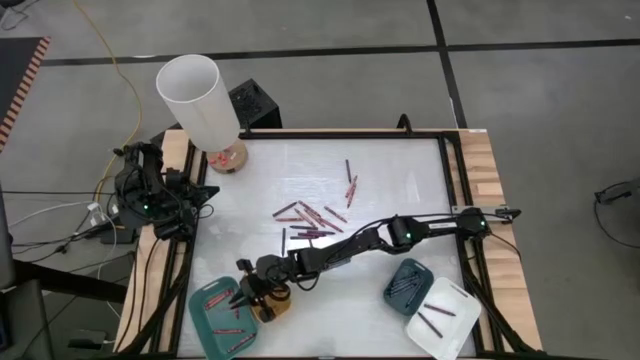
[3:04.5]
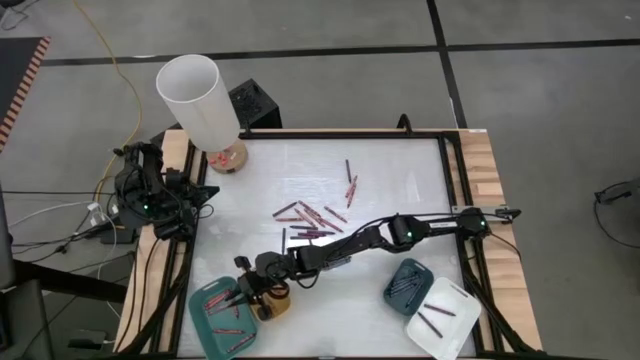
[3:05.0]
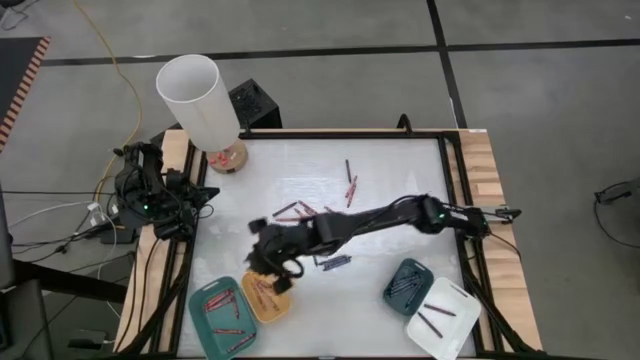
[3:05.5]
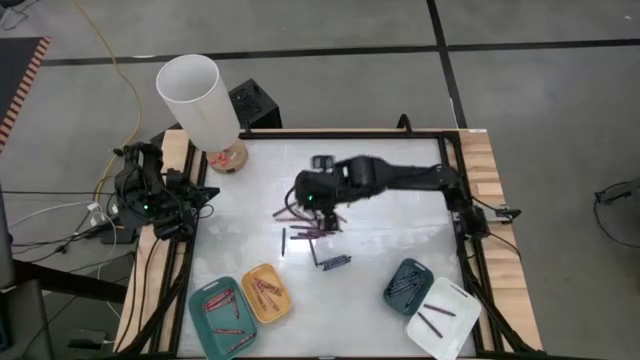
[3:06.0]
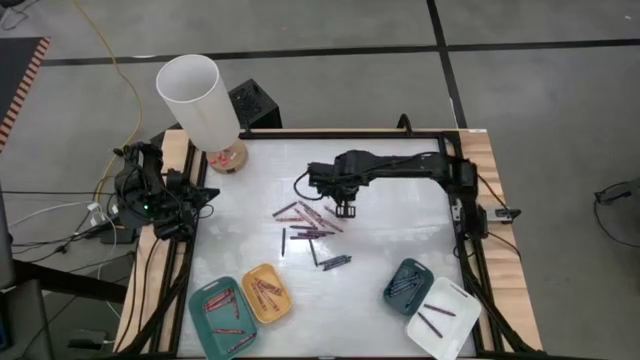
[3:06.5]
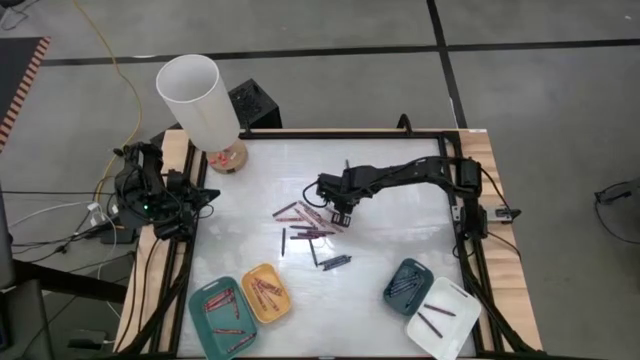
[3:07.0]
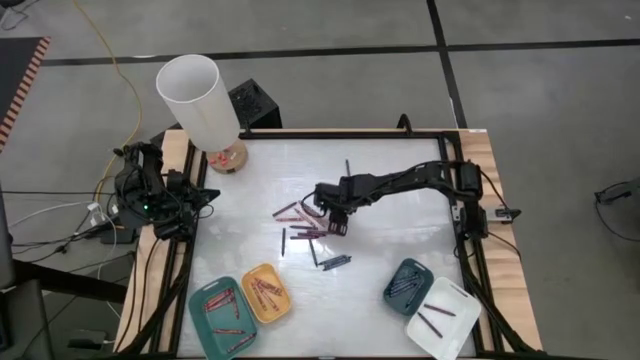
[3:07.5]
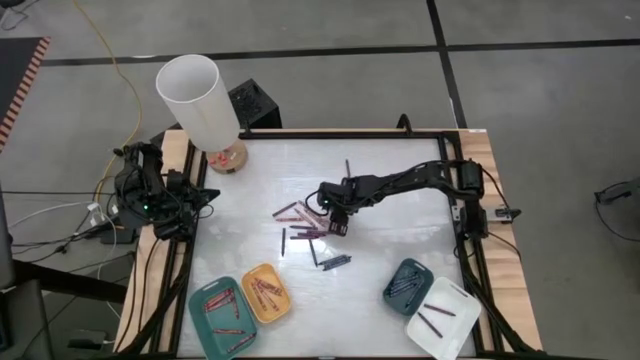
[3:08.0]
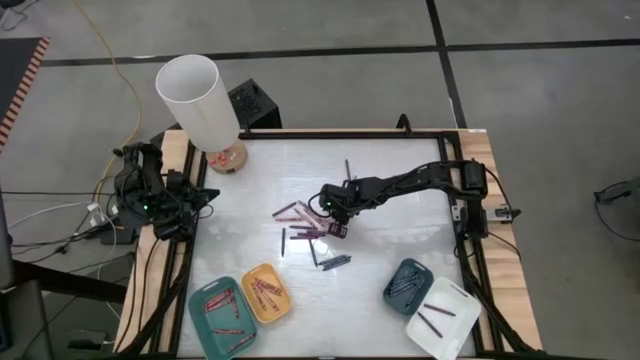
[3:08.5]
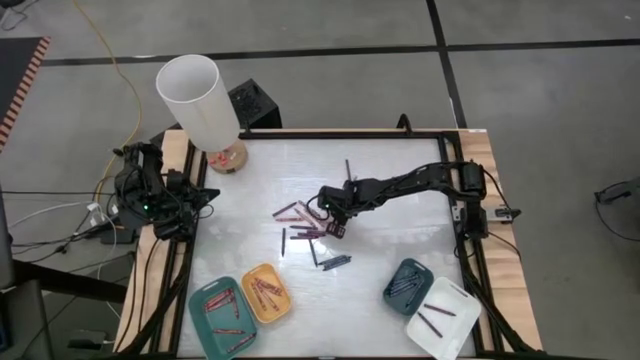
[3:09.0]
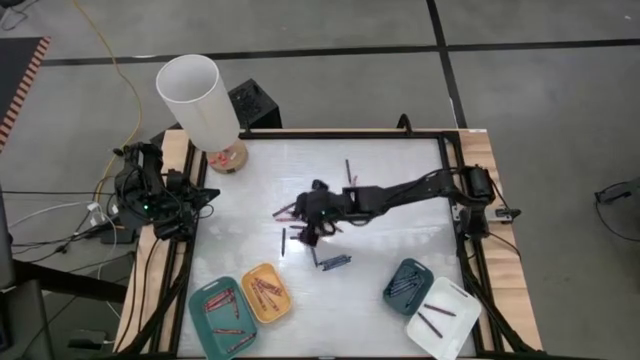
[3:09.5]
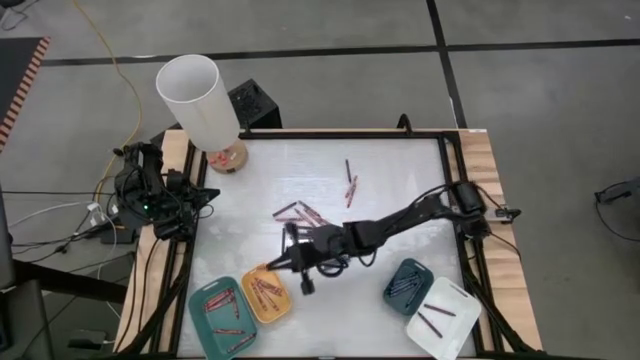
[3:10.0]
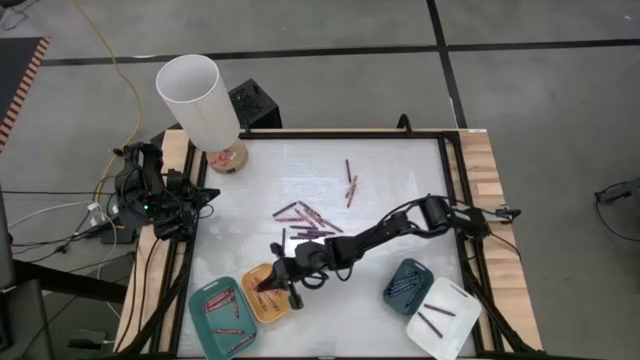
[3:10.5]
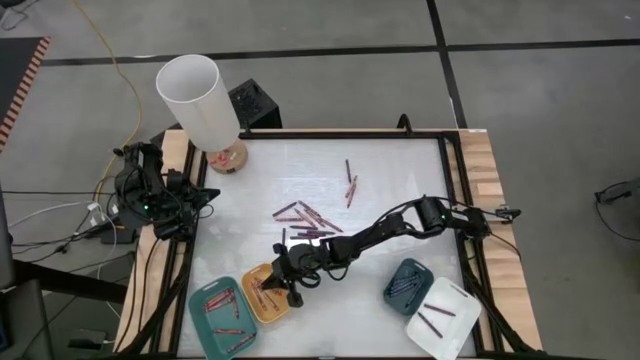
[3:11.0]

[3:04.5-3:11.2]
Task: Sort crayons
Put the pink crayon into the yellow bin

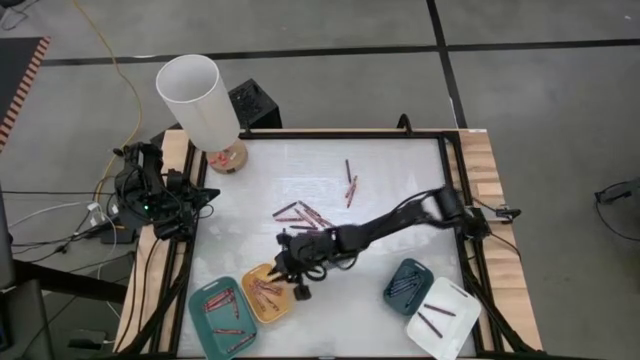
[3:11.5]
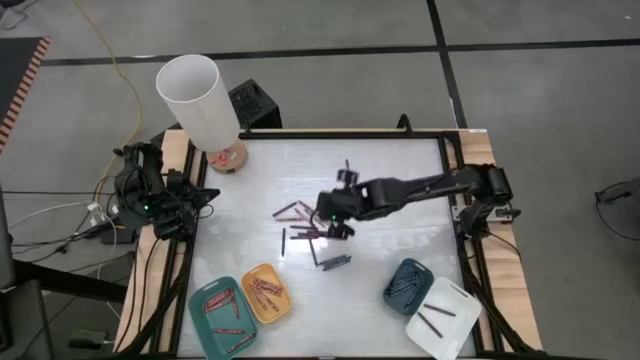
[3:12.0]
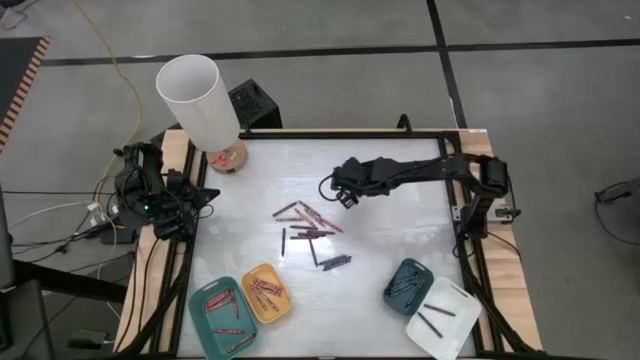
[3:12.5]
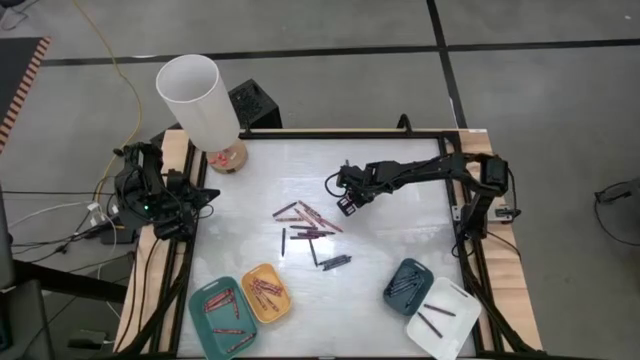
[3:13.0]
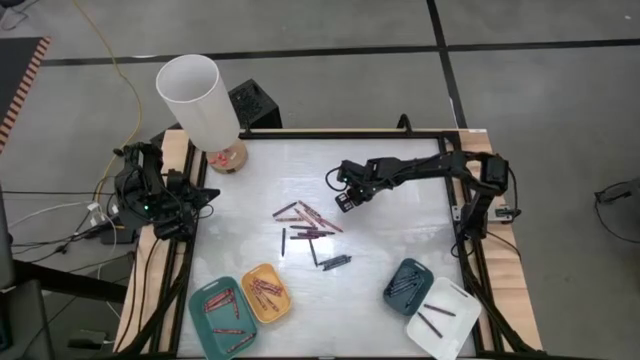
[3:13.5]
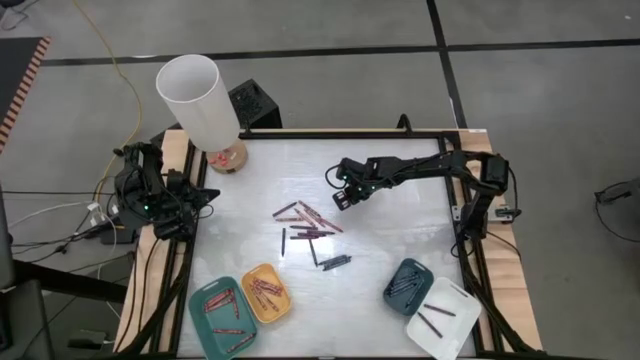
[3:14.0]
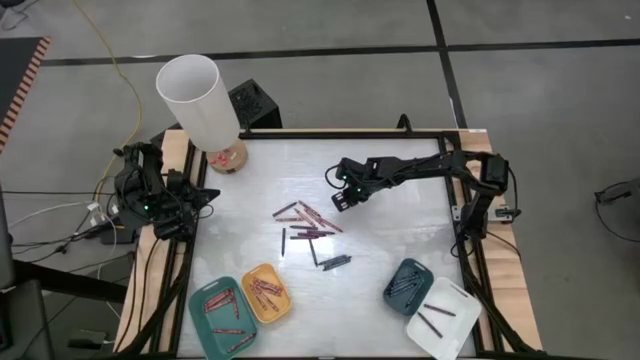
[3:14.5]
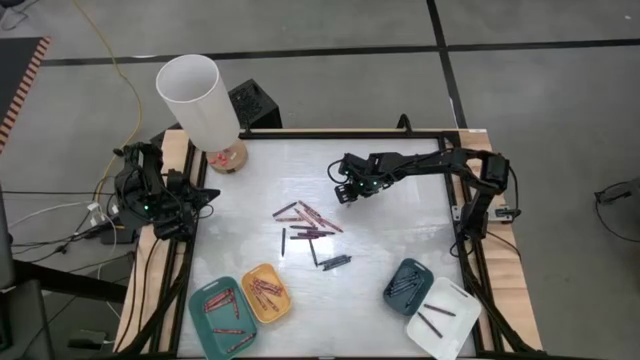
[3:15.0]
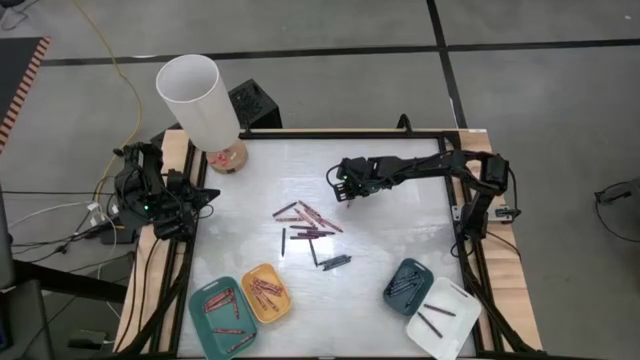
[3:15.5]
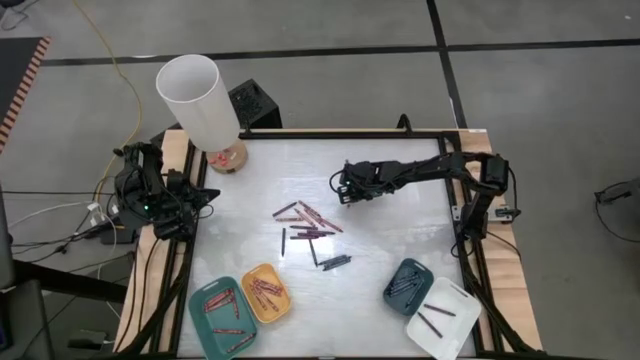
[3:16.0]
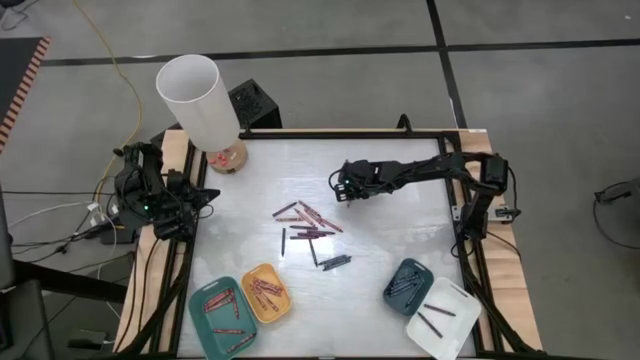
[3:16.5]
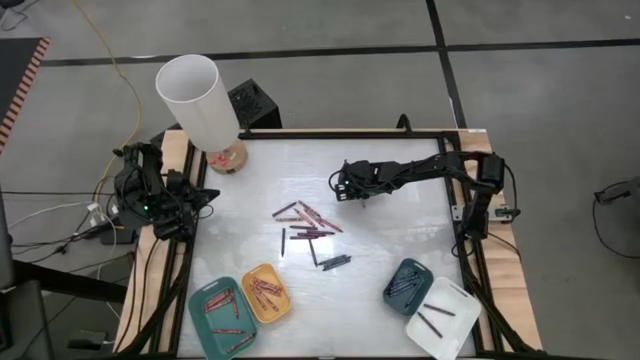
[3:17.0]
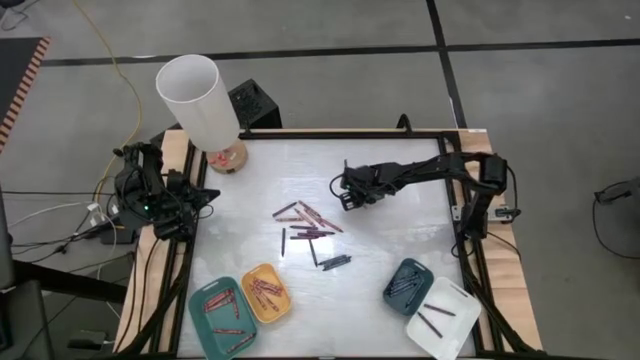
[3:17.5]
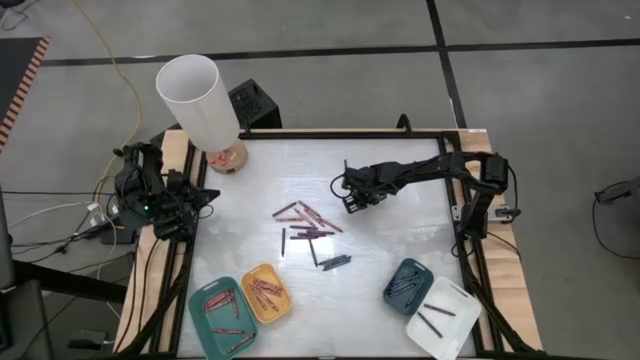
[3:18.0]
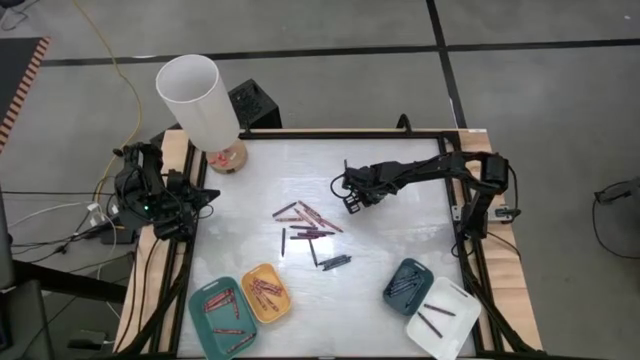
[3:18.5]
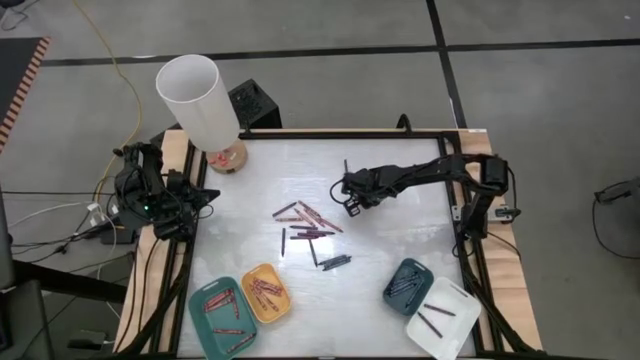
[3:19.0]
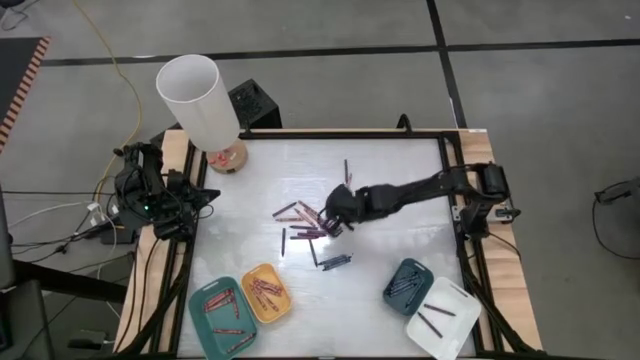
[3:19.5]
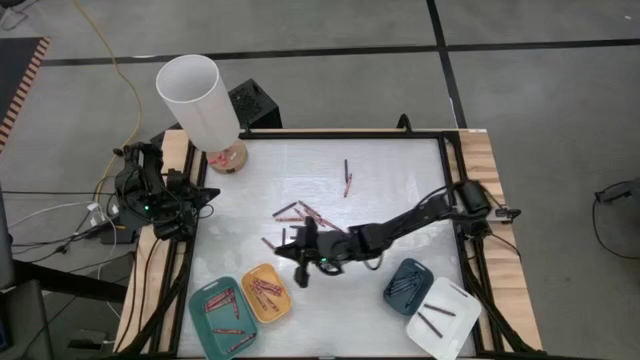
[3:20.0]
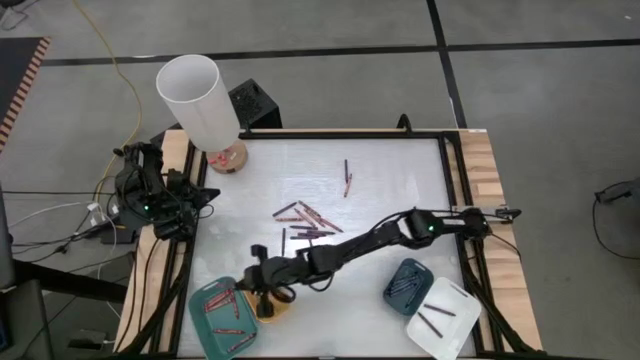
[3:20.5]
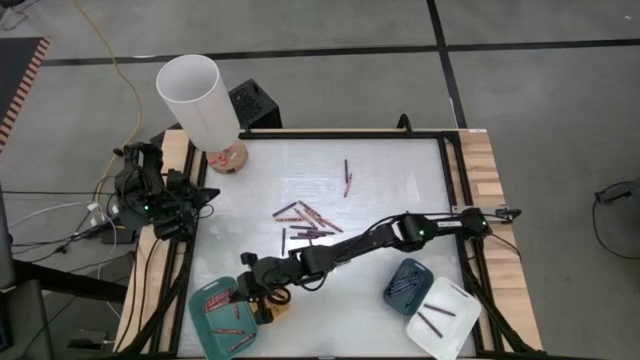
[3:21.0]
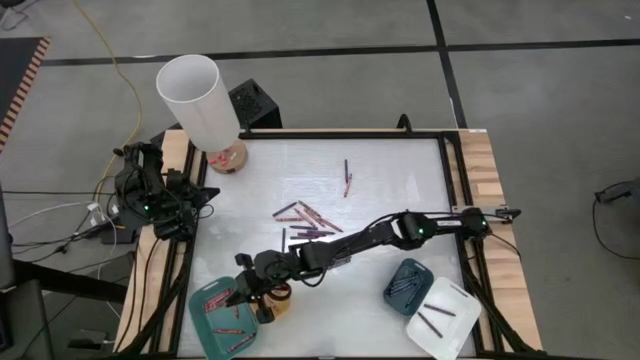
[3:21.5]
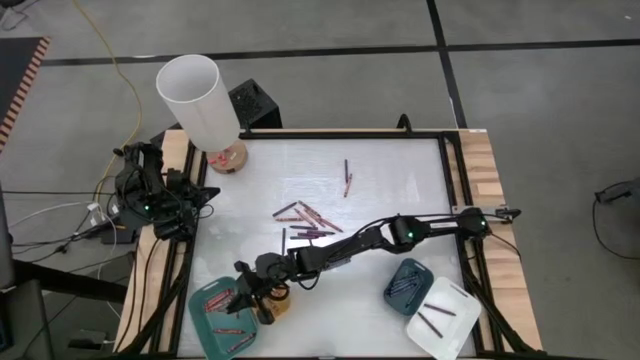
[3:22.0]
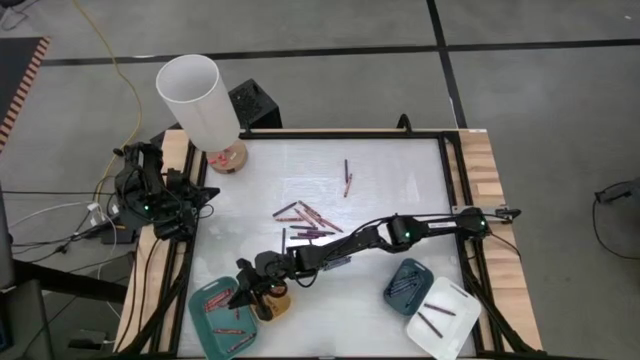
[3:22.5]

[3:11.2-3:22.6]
Put the red crayon into the blue bin

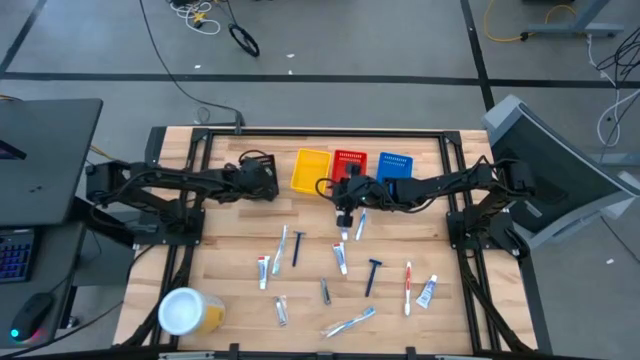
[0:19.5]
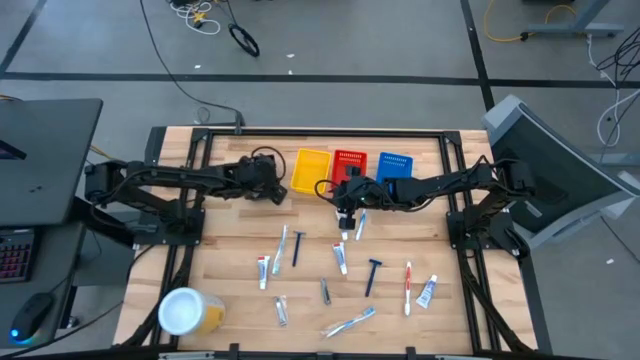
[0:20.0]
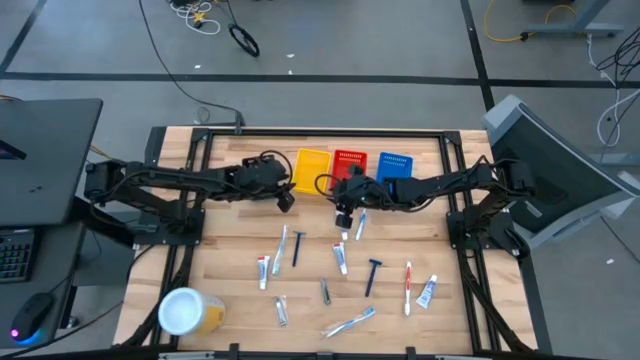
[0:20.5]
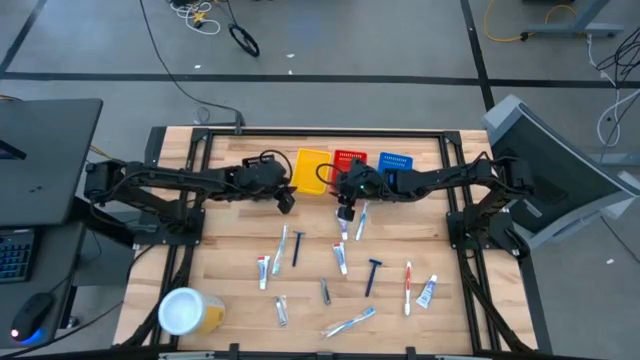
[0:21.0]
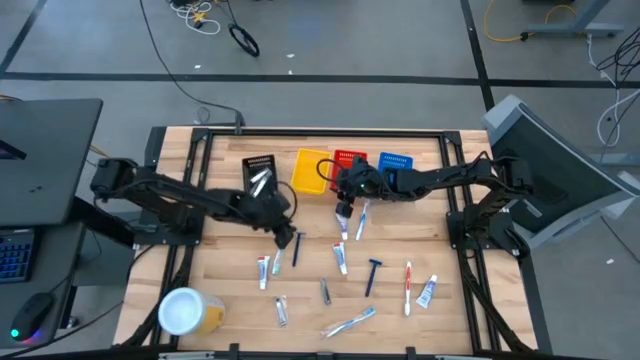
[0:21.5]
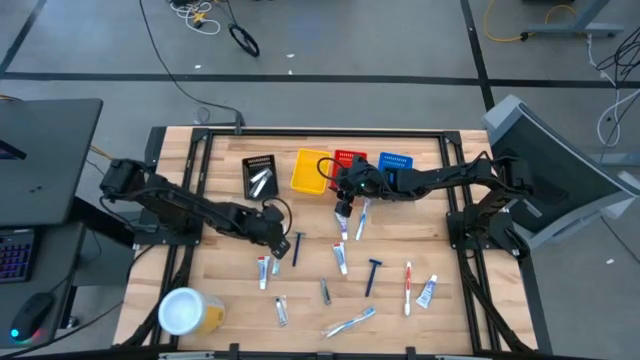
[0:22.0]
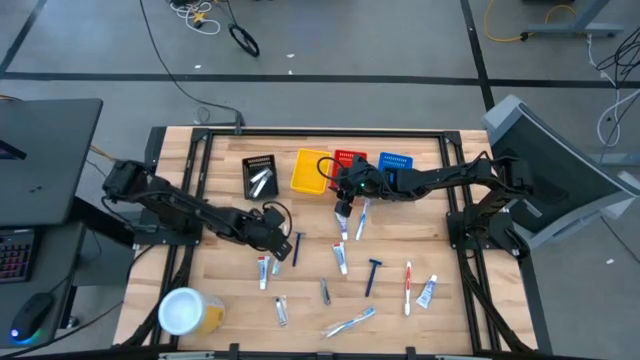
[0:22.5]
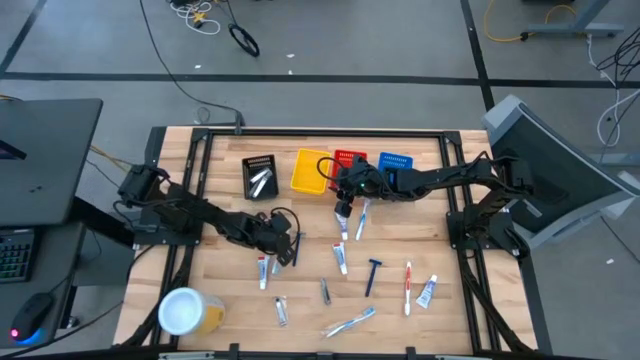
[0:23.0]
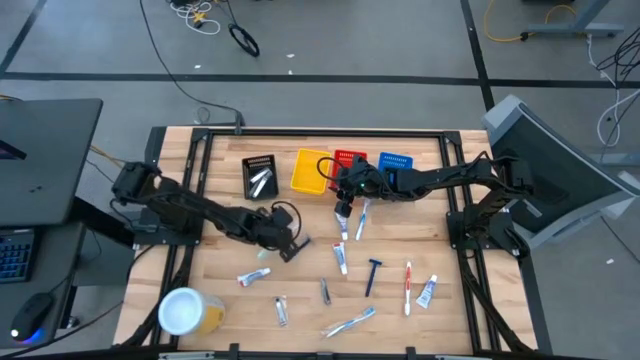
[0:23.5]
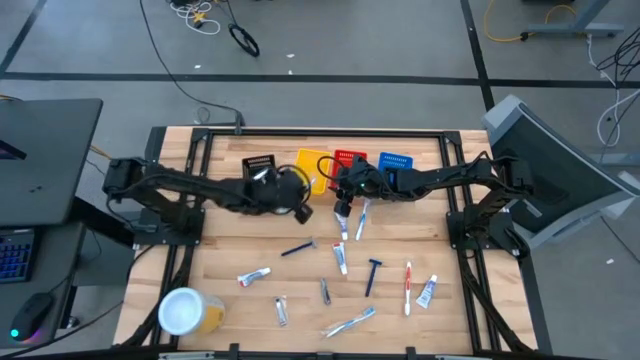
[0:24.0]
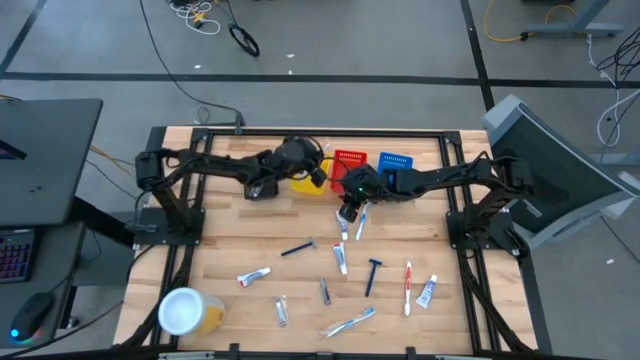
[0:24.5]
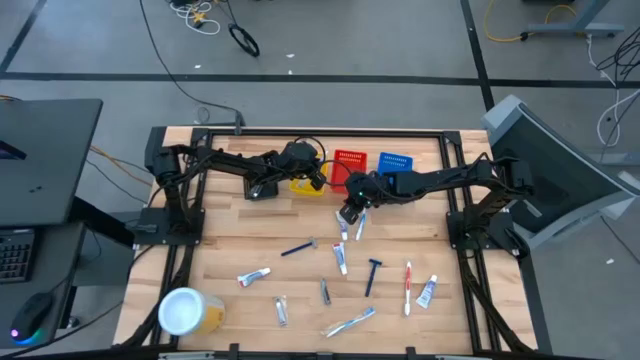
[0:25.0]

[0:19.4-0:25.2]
Task: Pick & Place Travel size toiletries
Put the green toothbrush into the yellow bin
